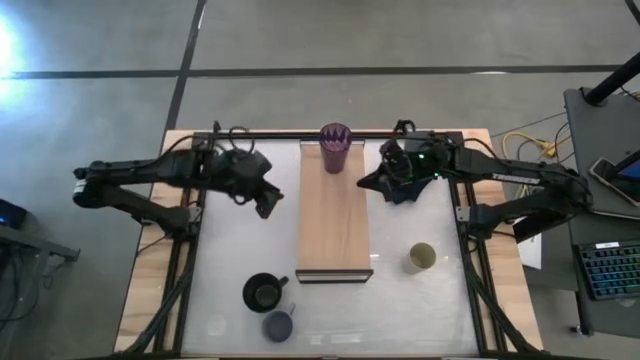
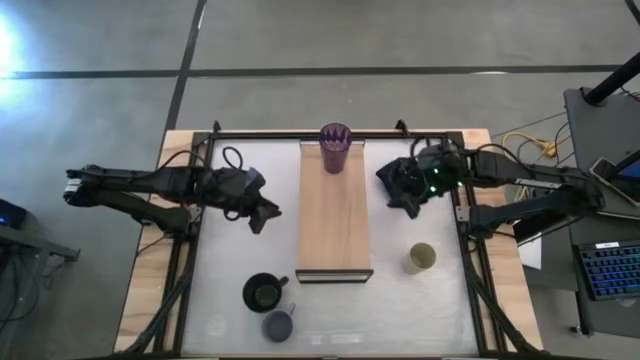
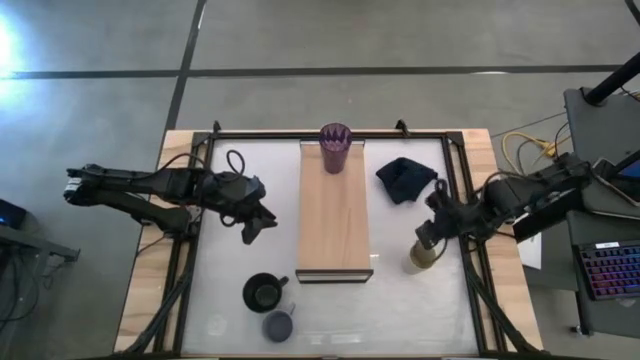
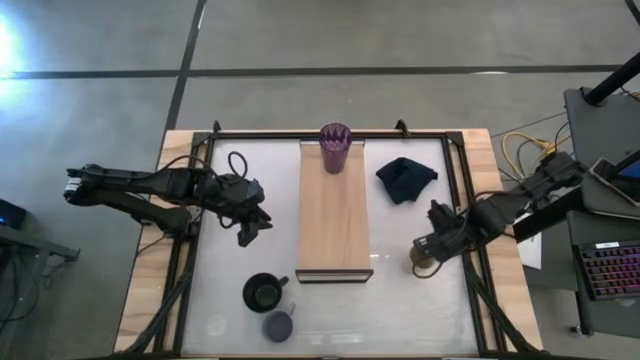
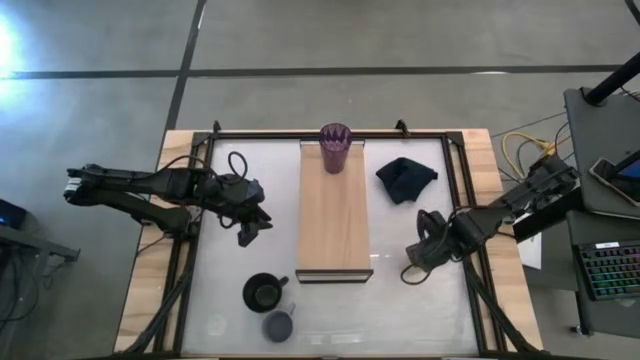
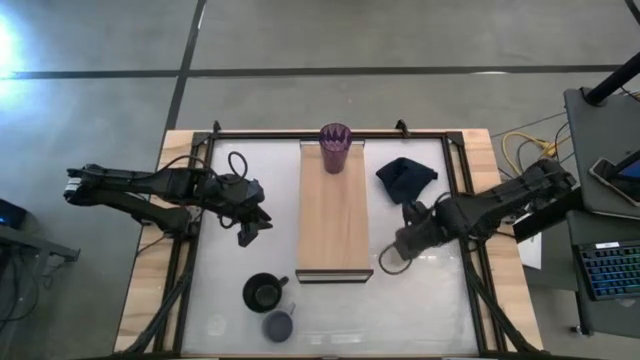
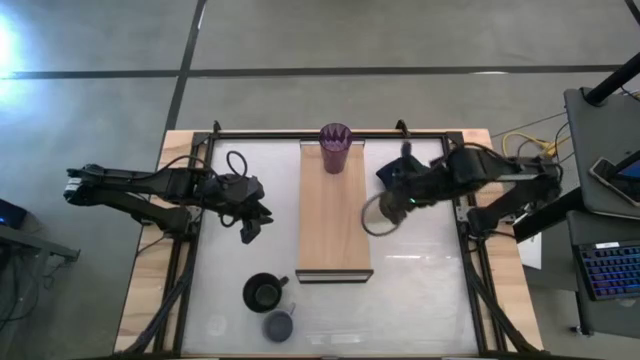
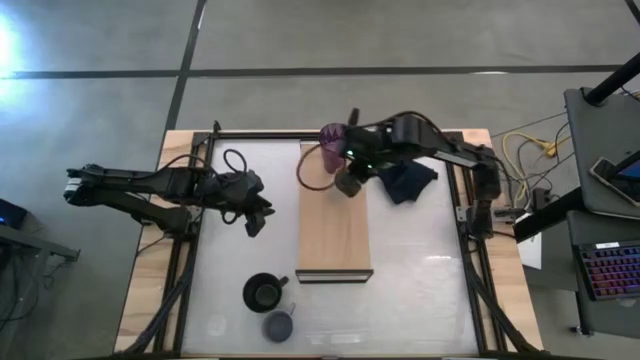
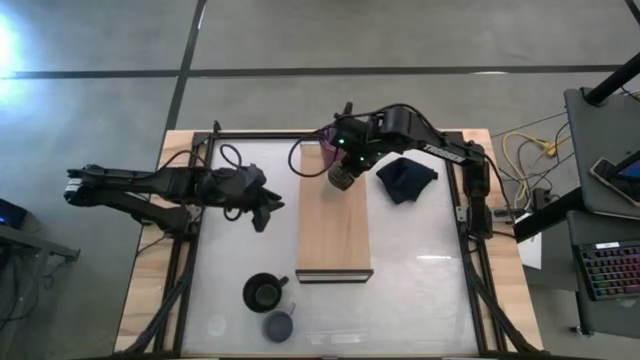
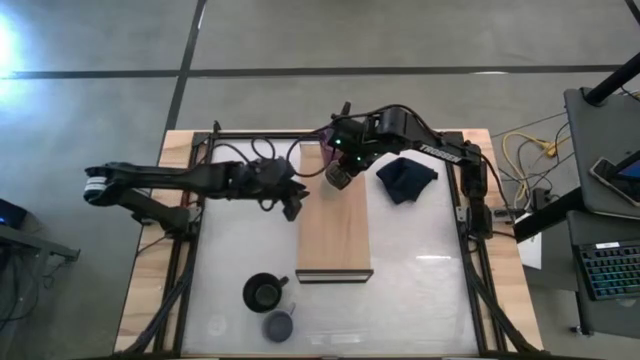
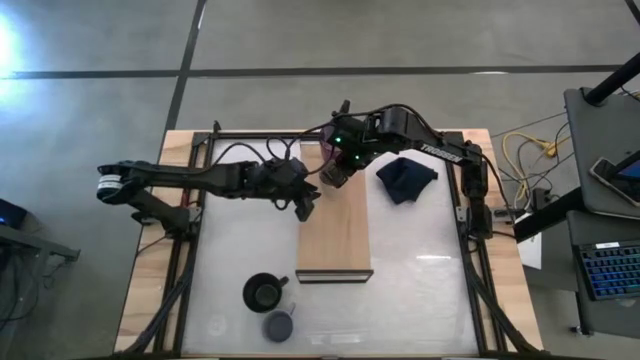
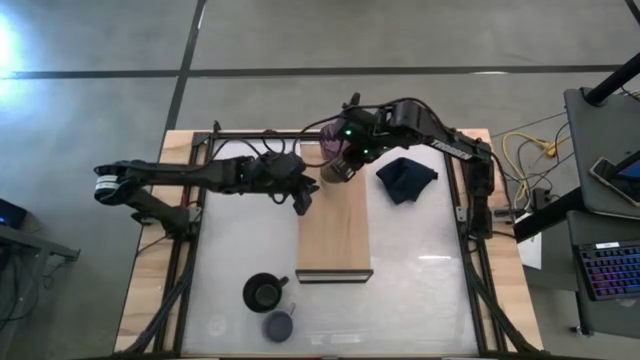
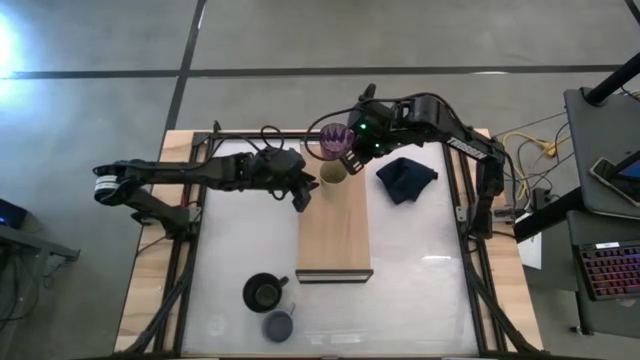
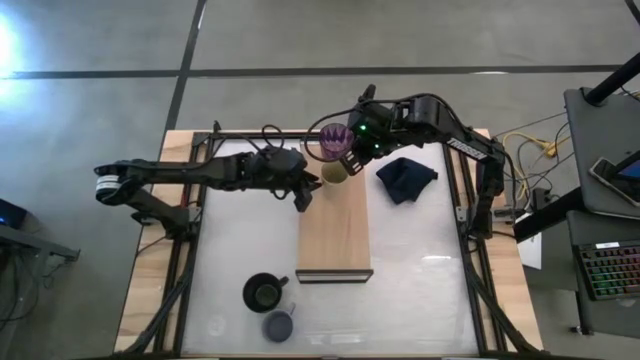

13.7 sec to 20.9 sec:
Task: Stack small to large cups/mugs on shelf
Put the light brown cup on the shelf

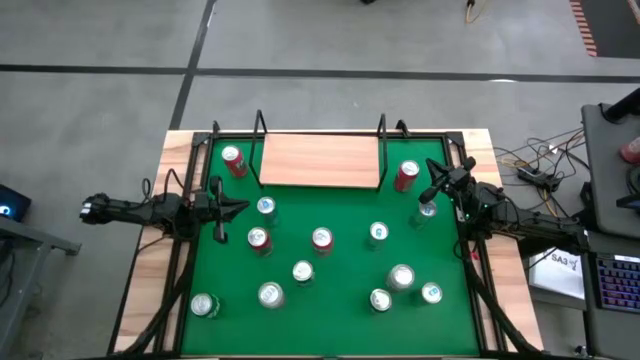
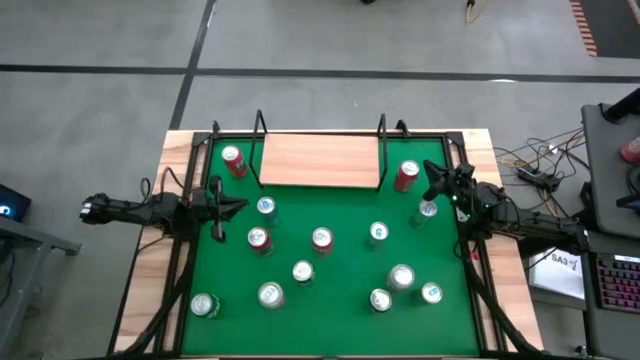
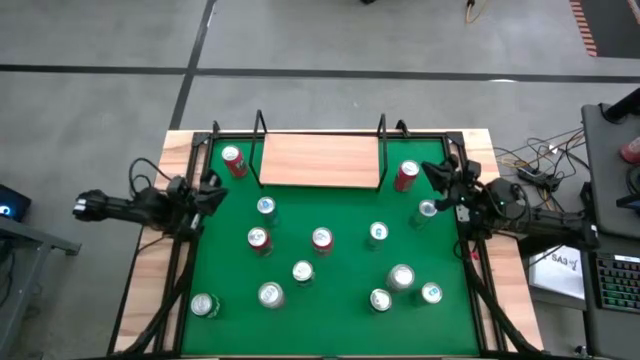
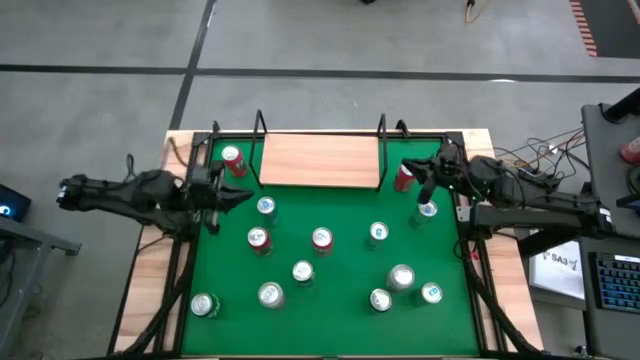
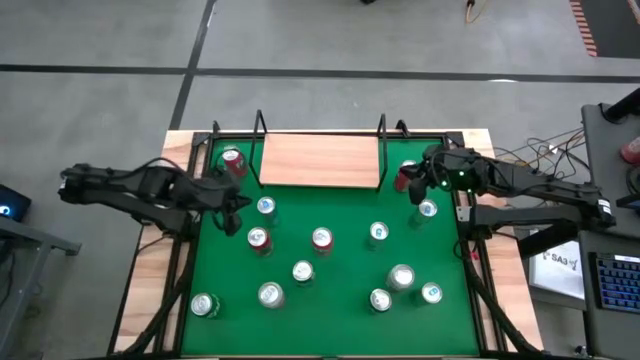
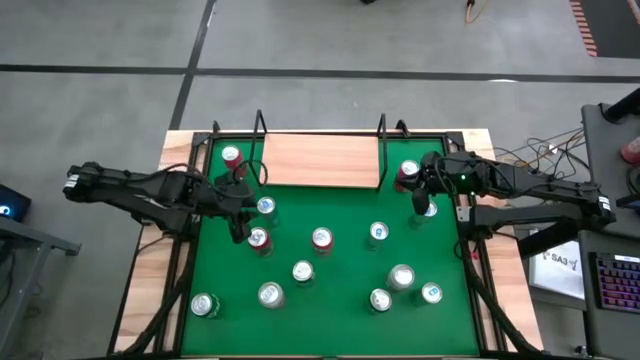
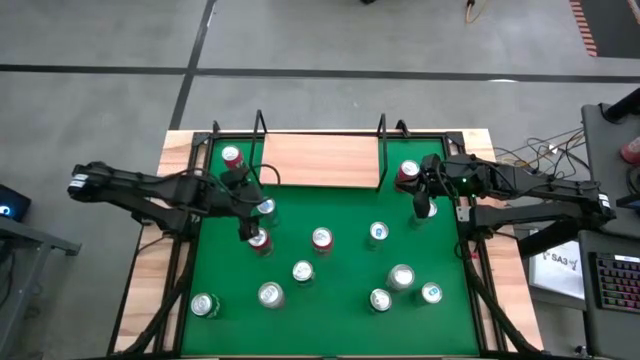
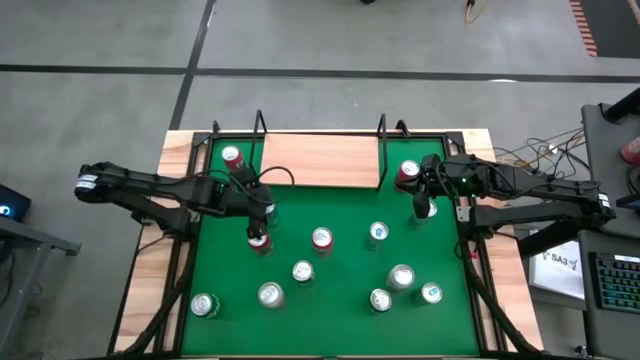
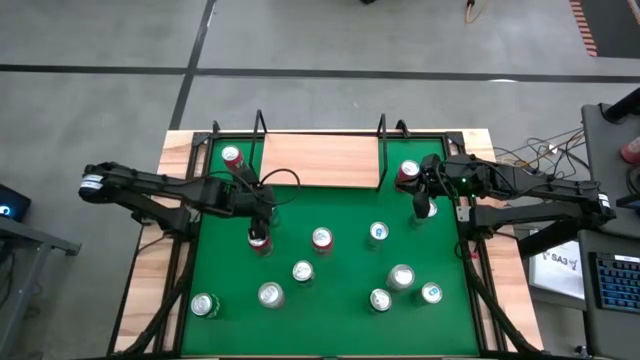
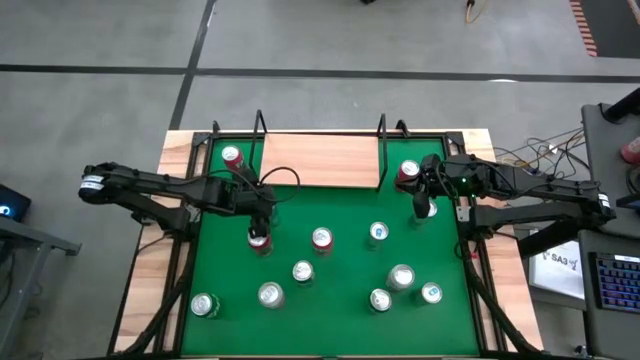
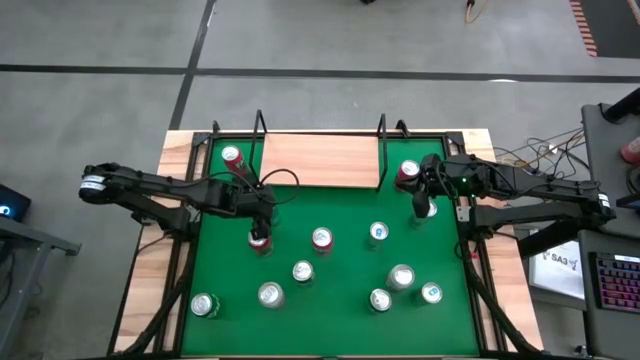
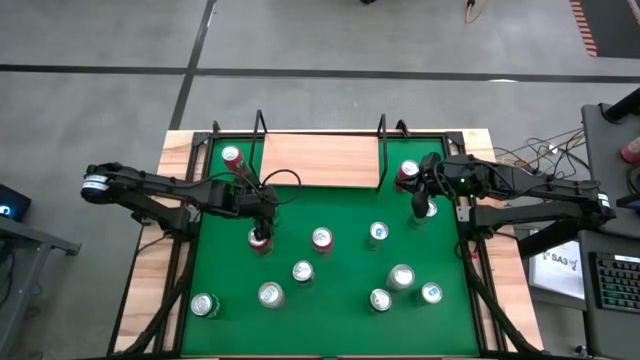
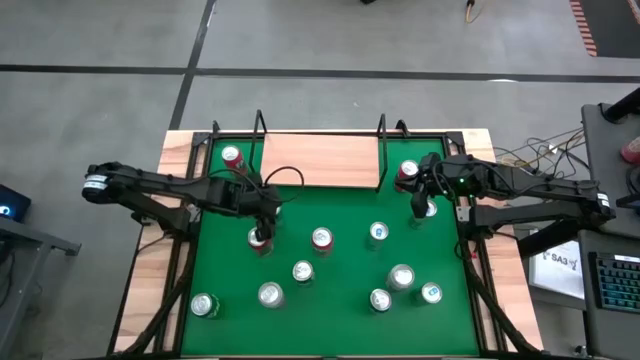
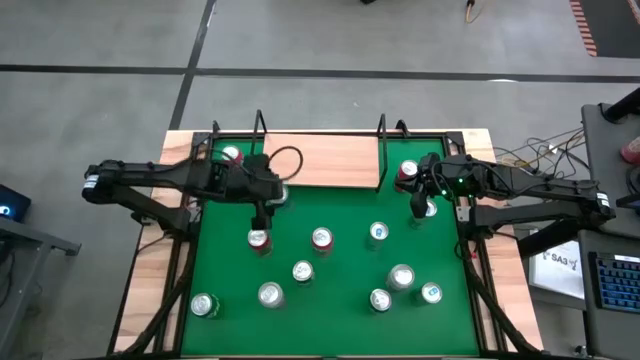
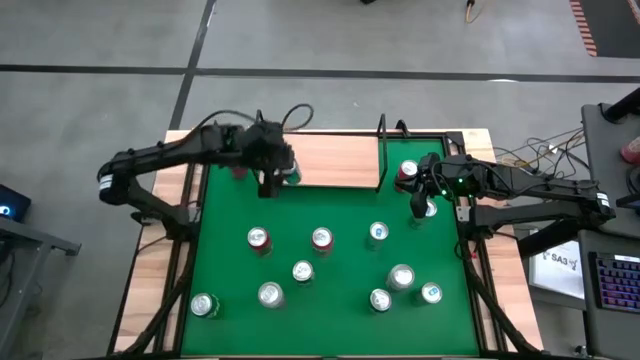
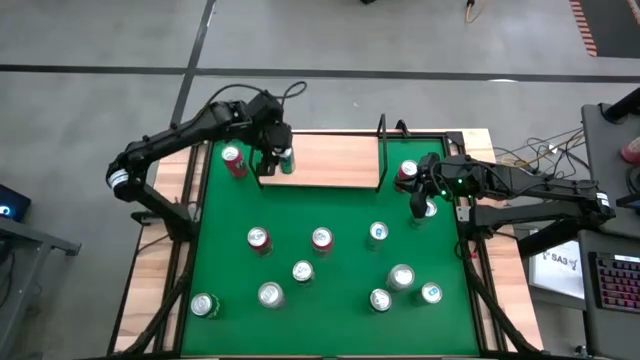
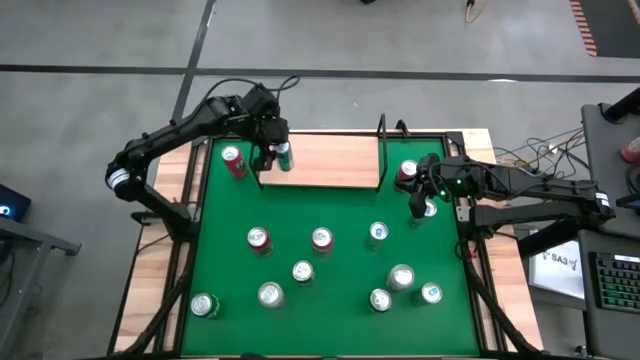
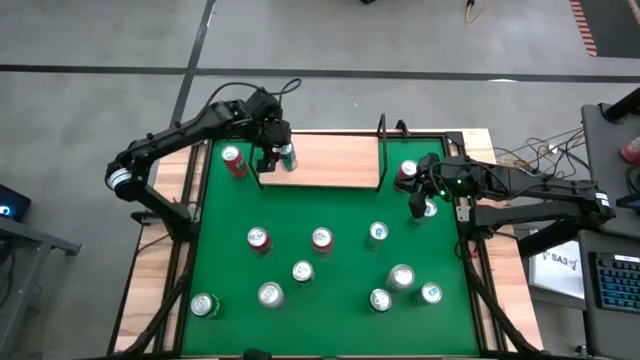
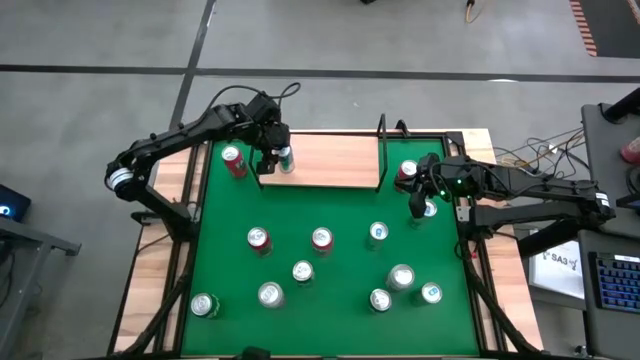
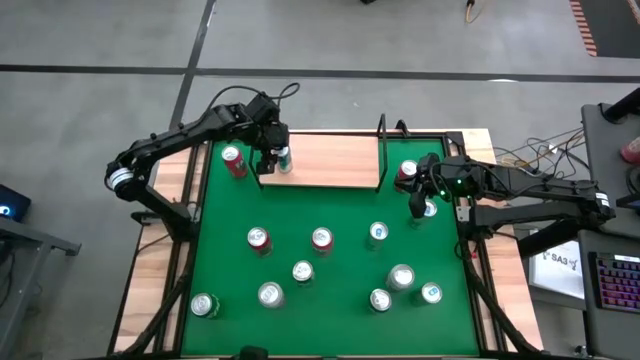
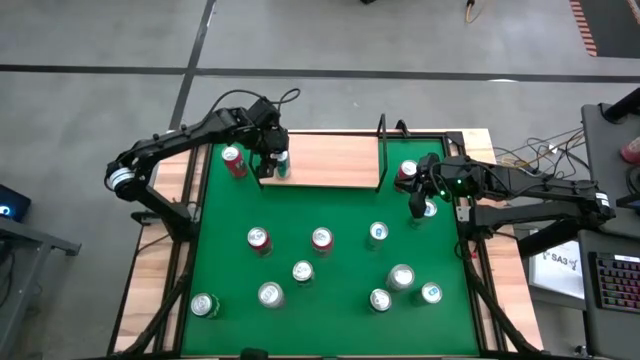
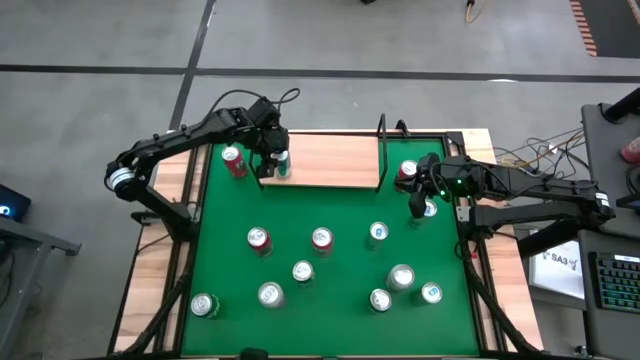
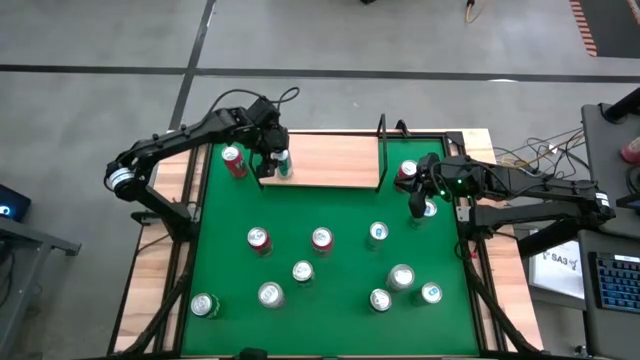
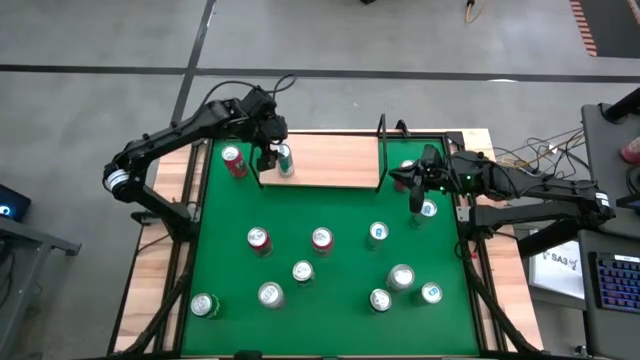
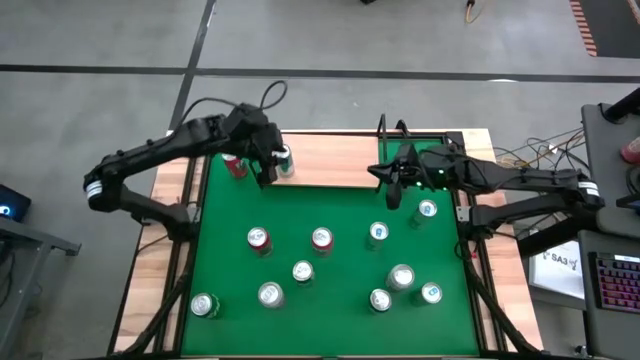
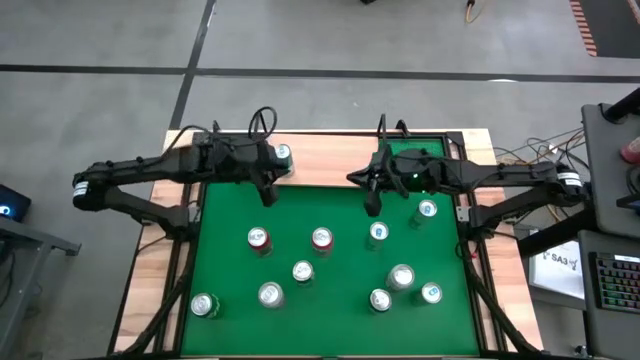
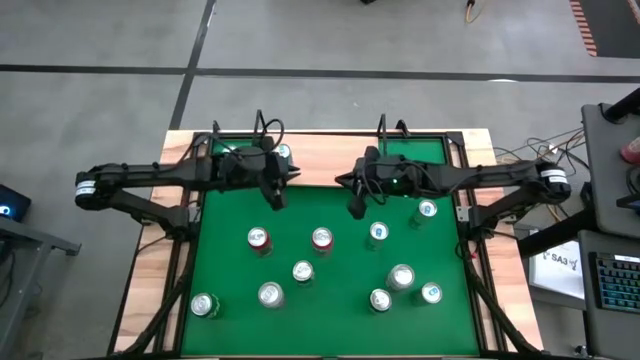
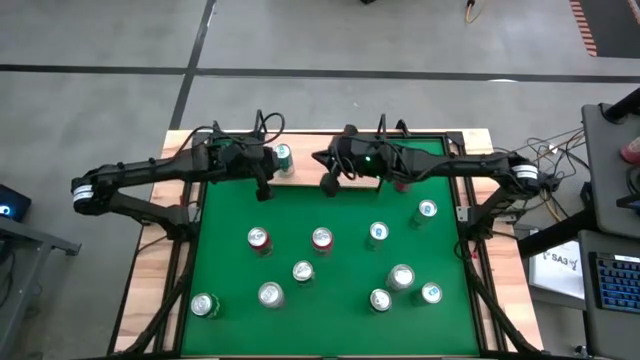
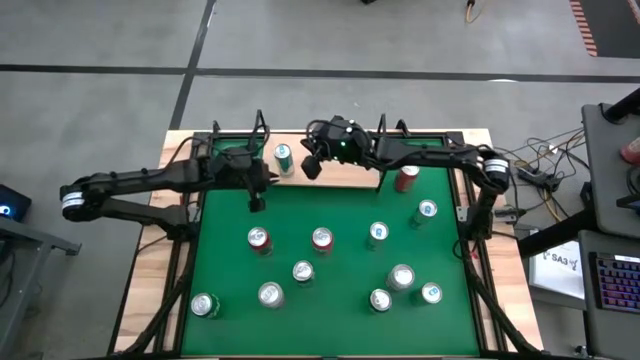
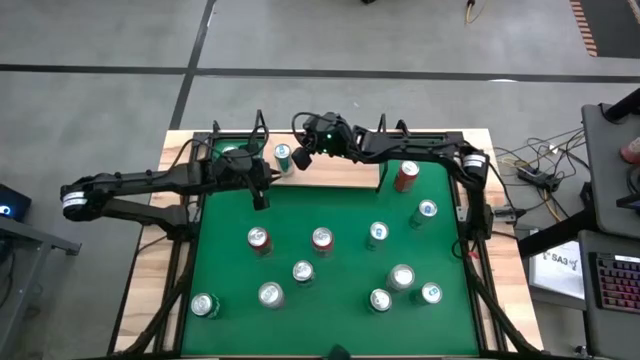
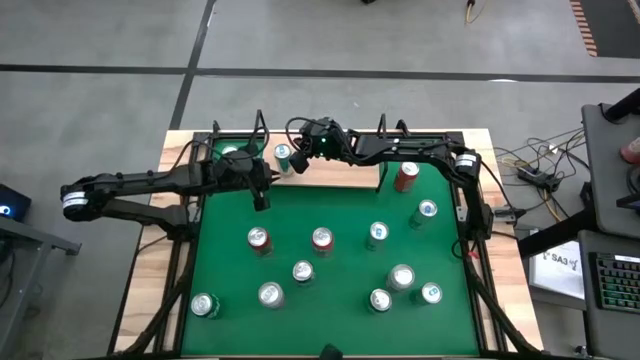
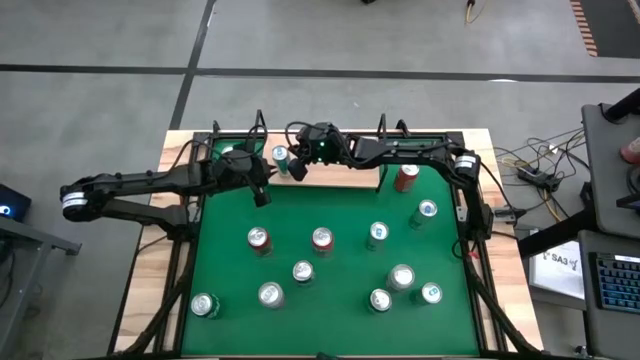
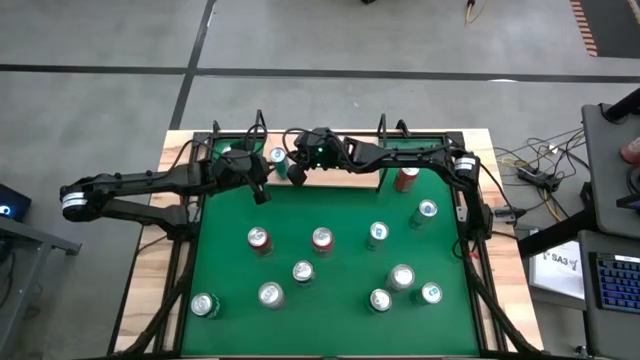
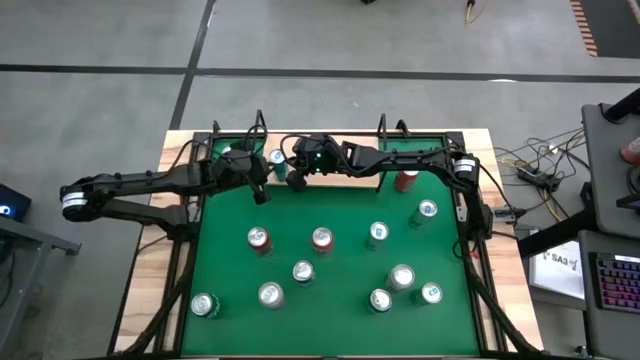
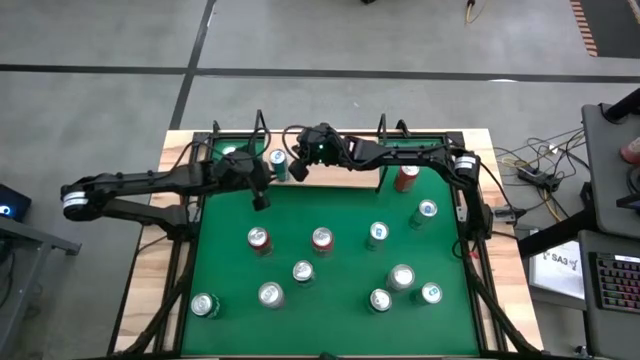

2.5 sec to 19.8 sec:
Task: Pick and place cans onto a shelf
Put the top left blue silver soda can on the shelf
